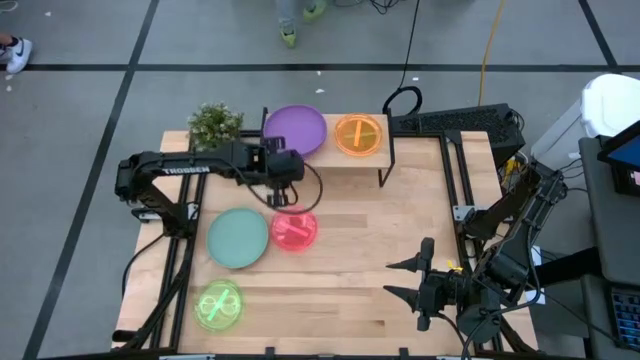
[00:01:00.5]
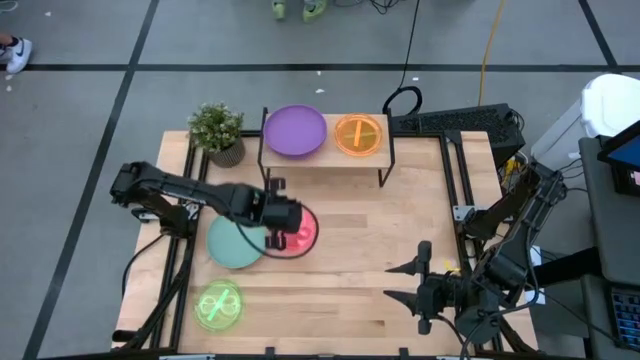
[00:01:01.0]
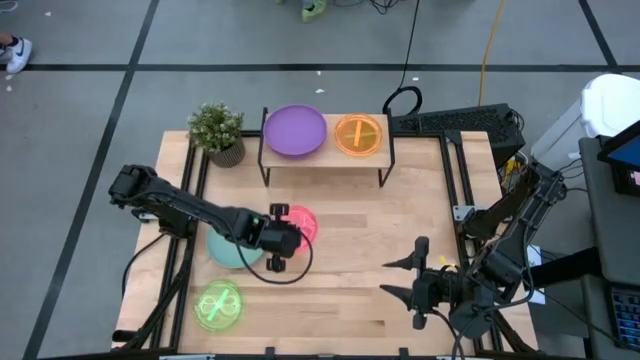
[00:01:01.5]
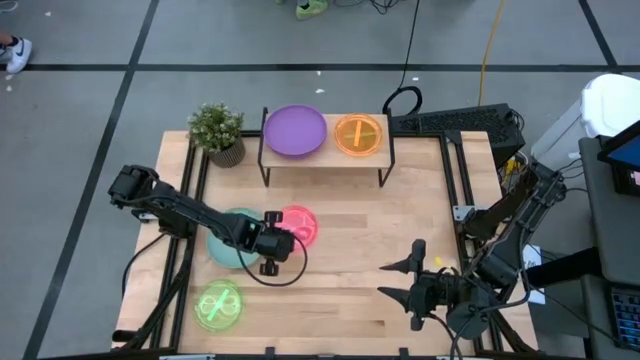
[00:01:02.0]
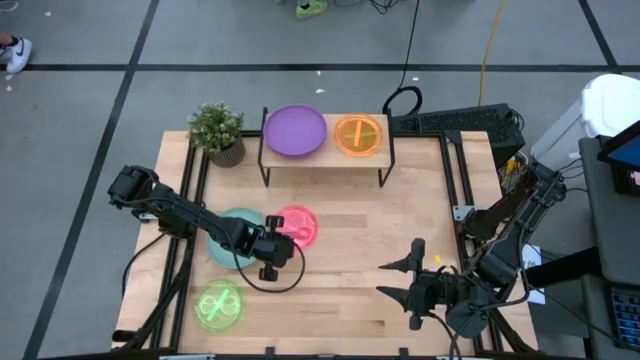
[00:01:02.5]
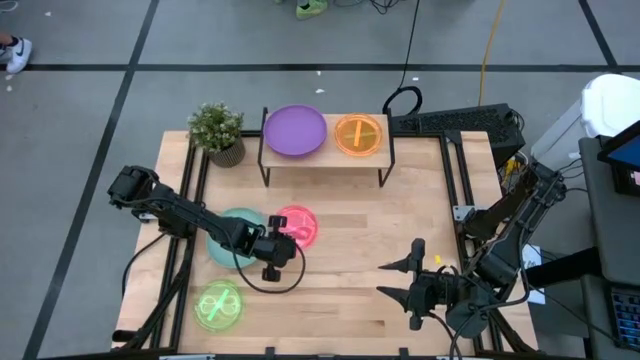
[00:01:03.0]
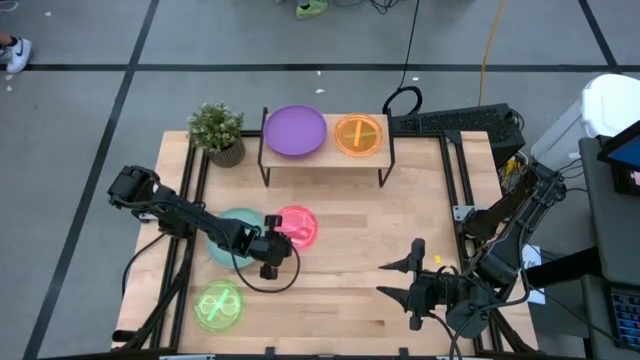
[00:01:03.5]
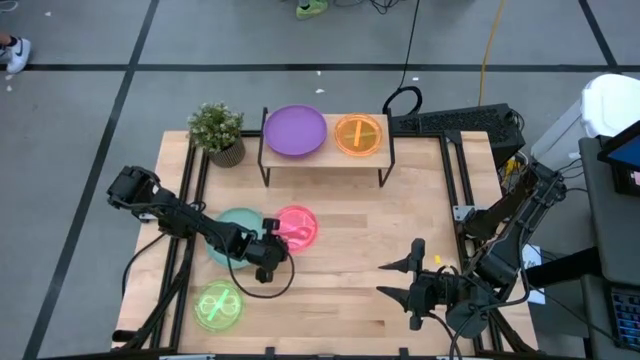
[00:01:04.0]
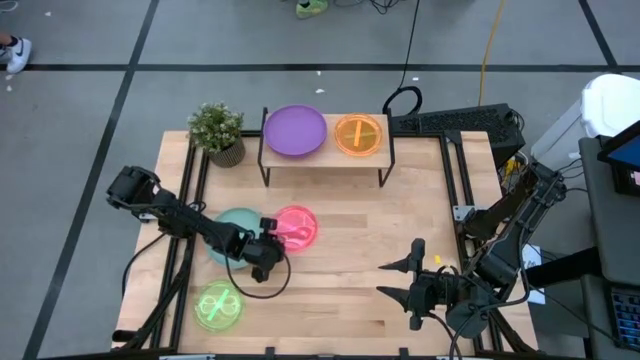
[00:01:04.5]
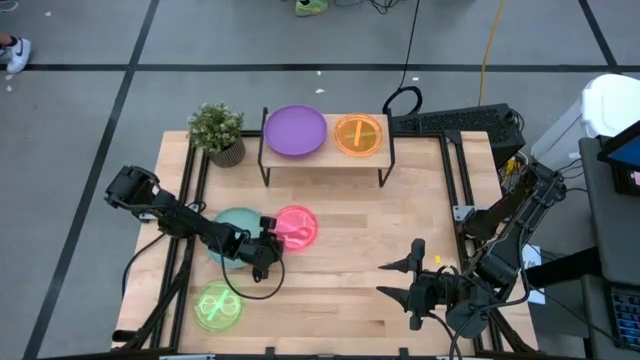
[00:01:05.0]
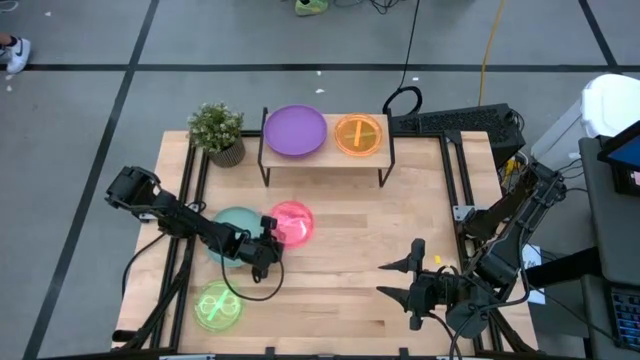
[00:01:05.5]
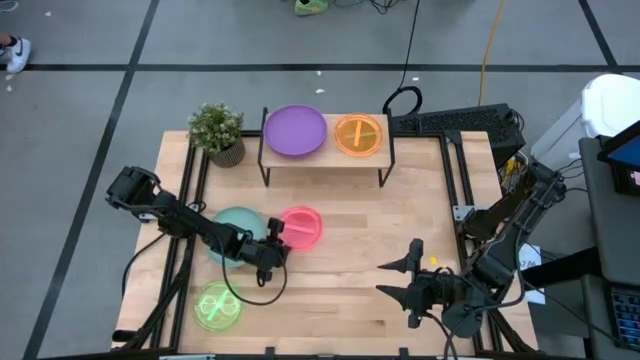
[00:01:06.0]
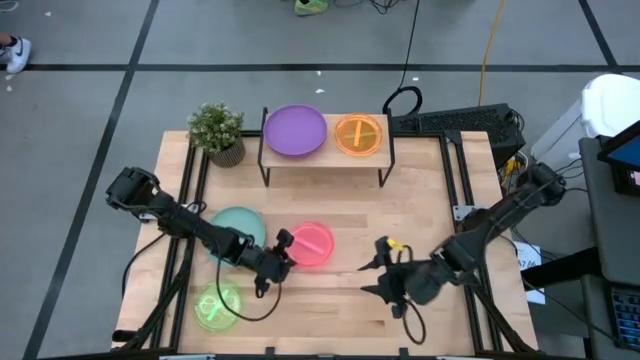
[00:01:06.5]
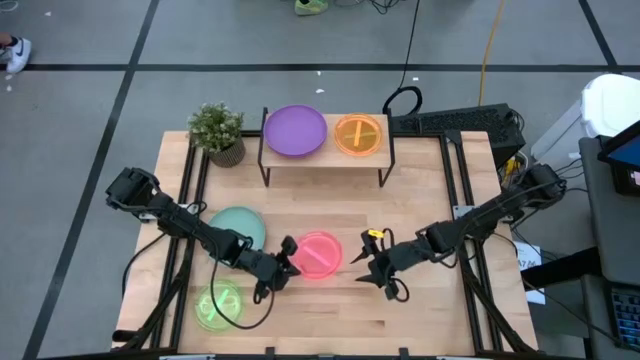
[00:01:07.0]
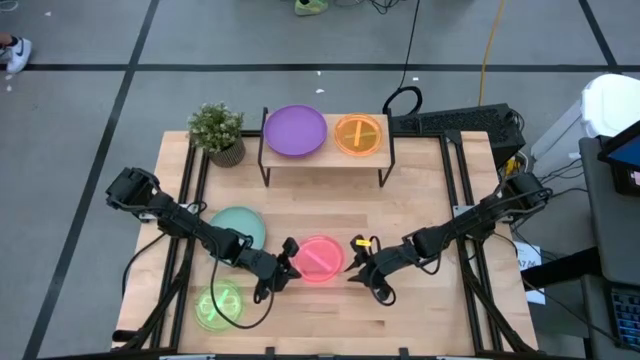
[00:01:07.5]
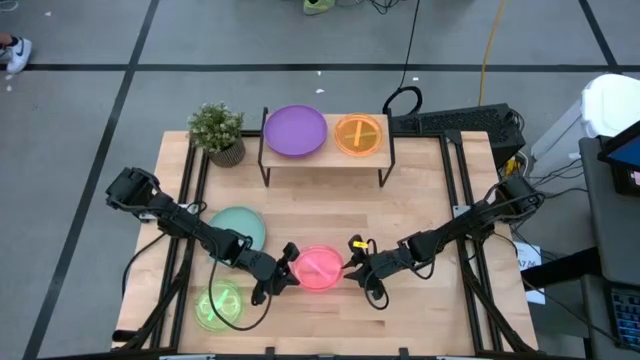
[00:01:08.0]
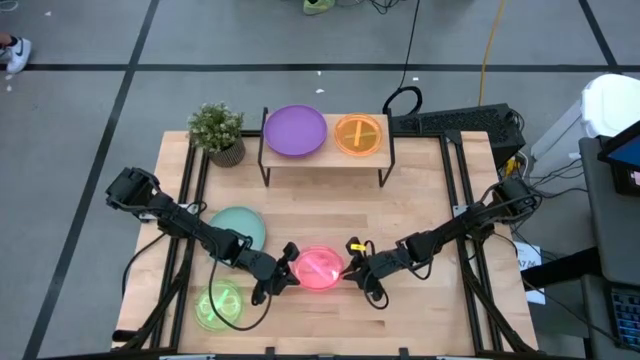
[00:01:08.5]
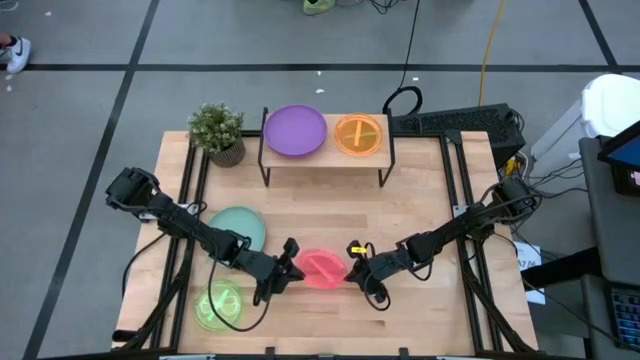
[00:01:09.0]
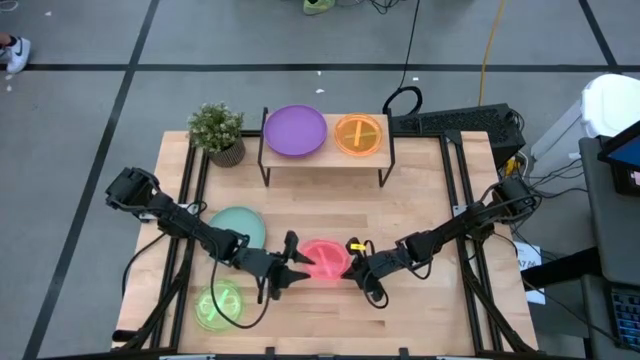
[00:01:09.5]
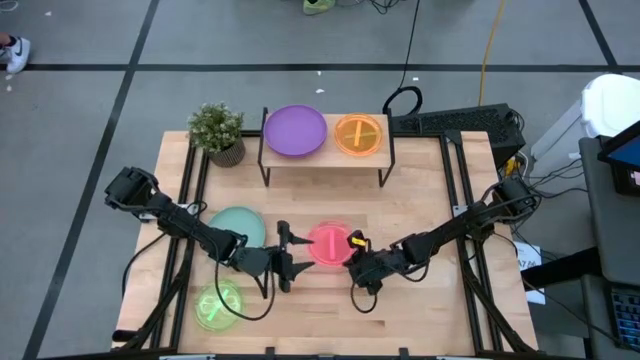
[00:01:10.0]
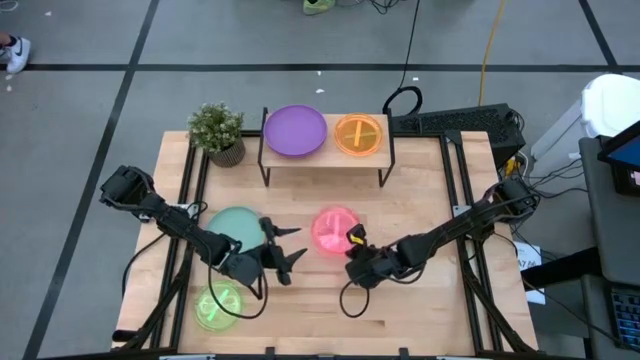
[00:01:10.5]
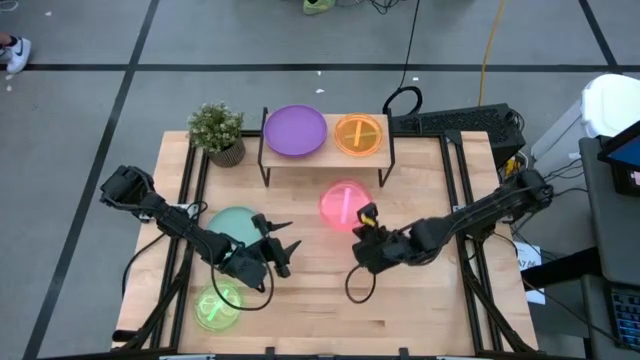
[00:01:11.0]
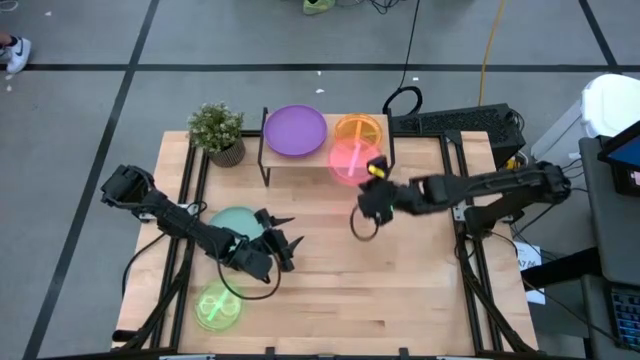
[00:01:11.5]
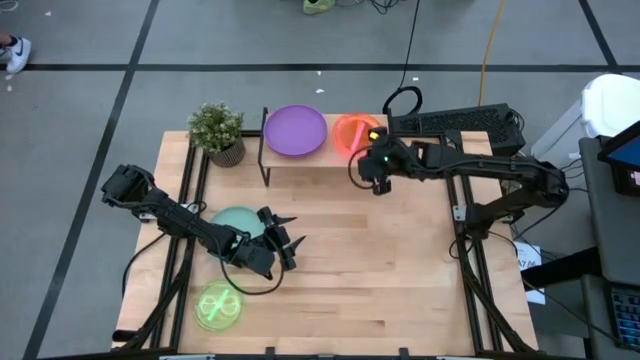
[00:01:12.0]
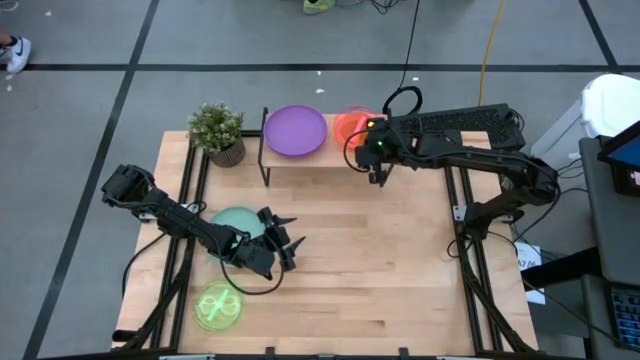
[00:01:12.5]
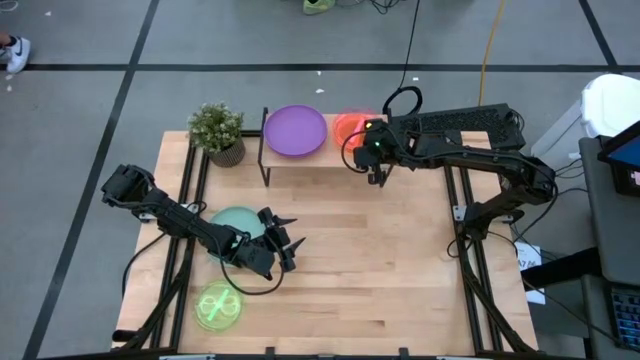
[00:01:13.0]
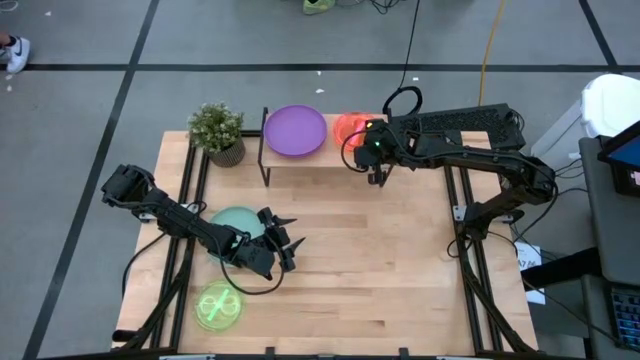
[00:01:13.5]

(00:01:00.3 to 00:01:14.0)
Task: Place and stack plates onto a shelf
Stack the transparent pink plate on top of the transparent orange plate on the shelf

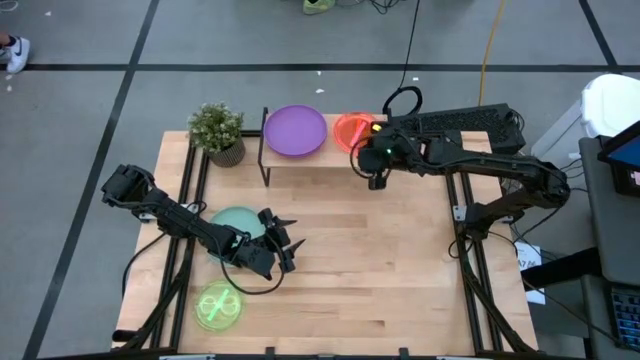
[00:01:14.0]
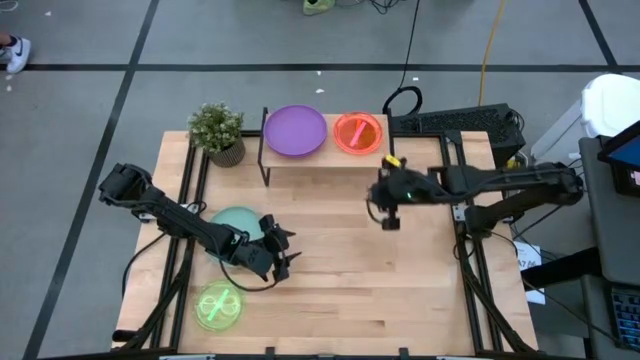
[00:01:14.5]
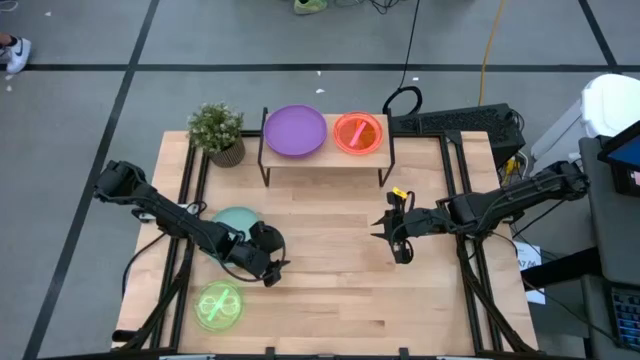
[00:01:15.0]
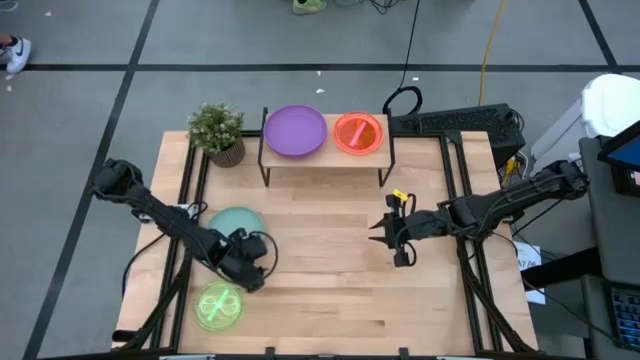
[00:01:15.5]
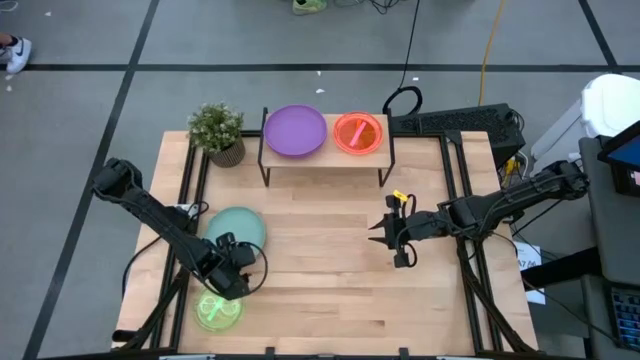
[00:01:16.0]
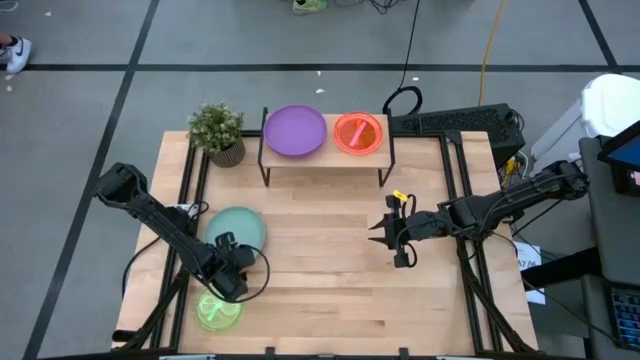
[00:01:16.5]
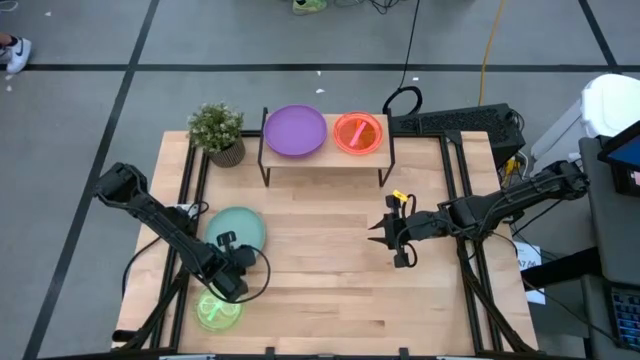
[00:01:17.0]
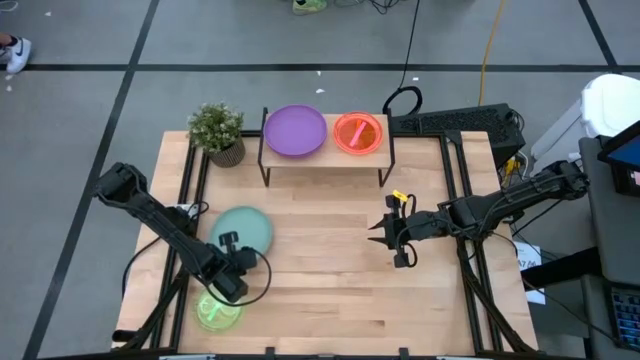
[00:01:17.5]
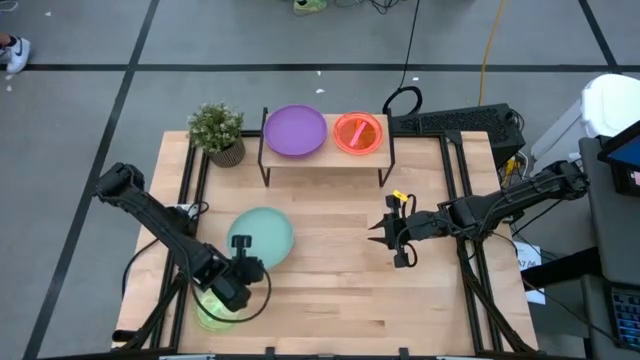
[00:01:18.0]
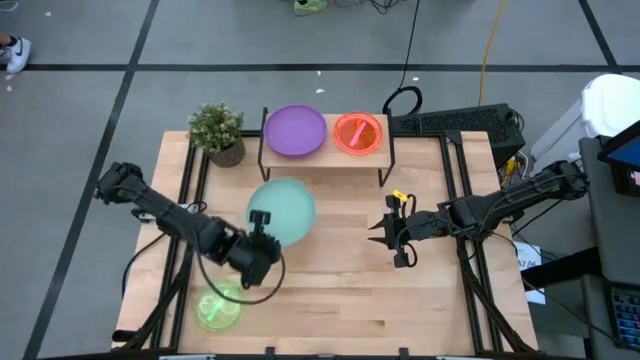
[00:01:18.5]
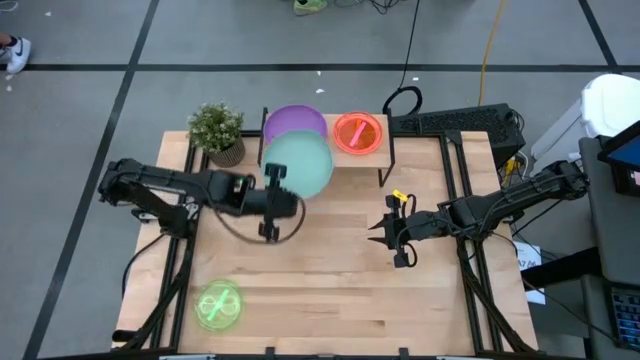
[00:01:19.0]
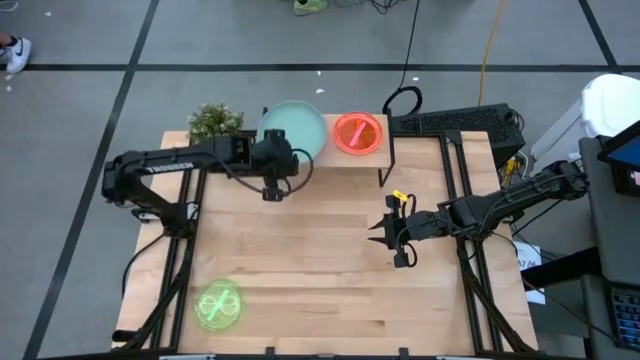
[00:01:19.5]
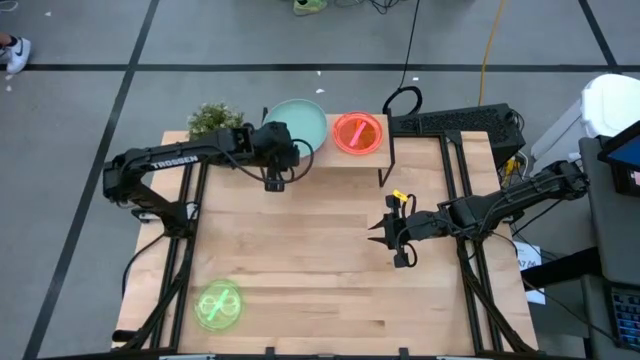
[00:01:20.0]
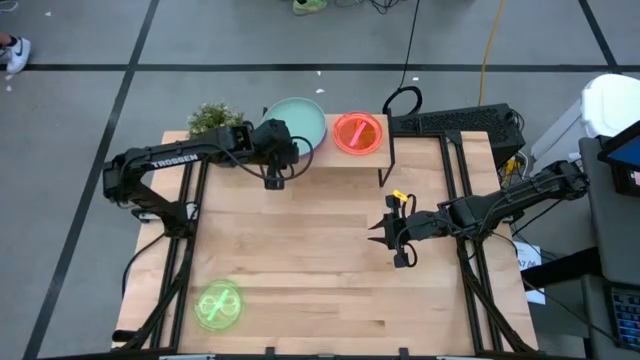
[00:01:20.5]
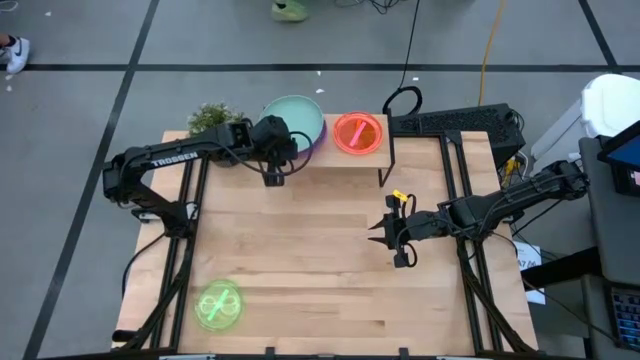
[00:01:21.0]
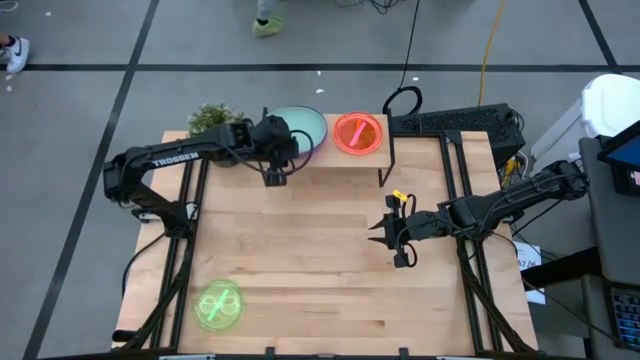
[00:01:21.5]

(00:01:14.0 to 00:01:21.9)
Stack the light green plate on top of the purple plate on the shelf
